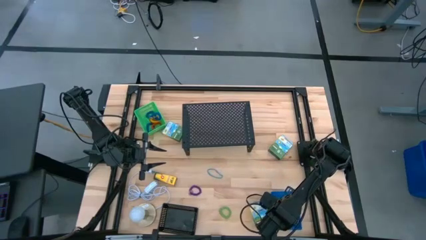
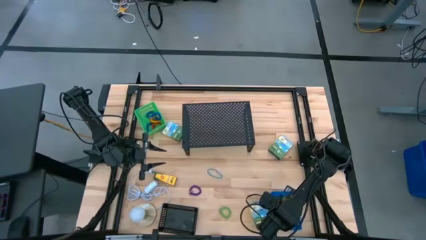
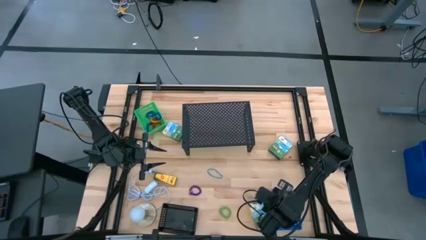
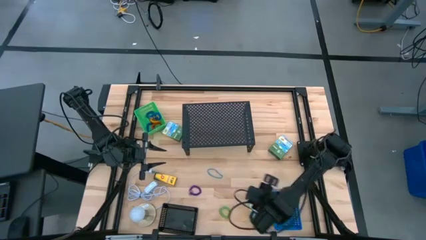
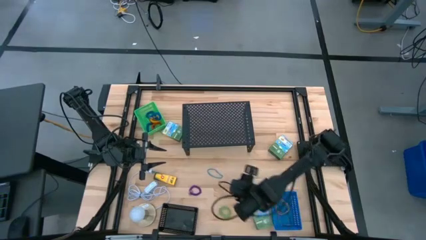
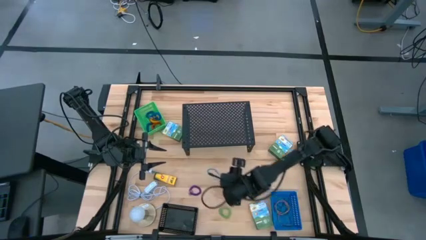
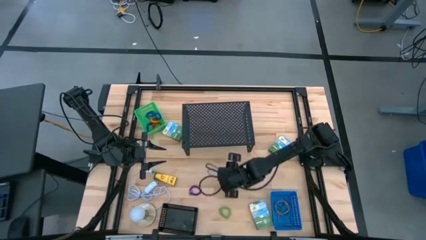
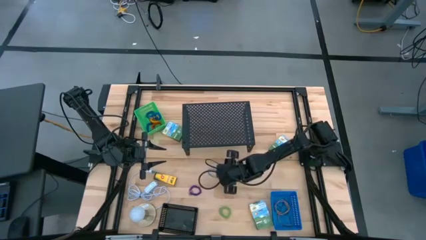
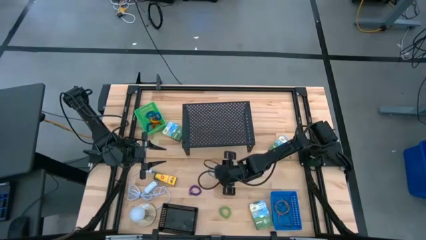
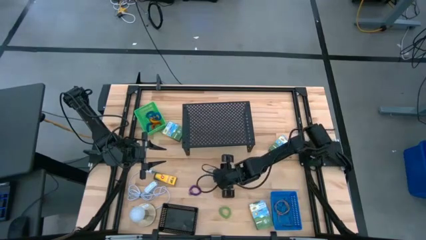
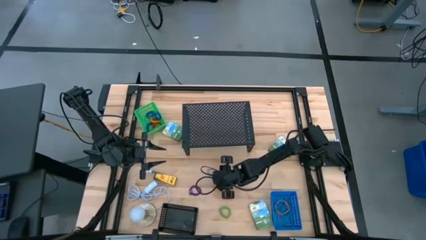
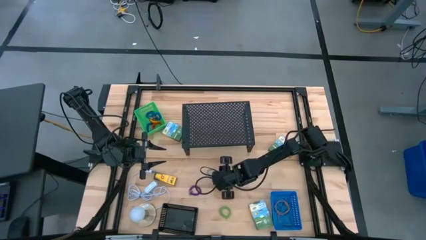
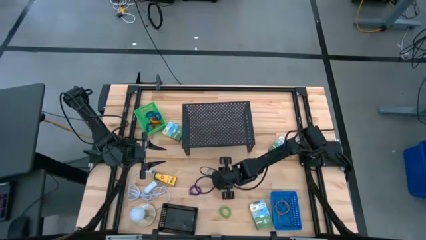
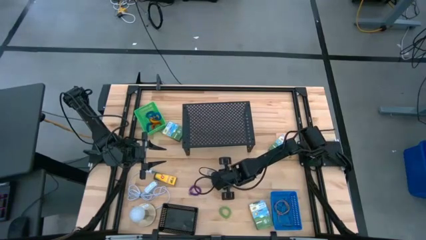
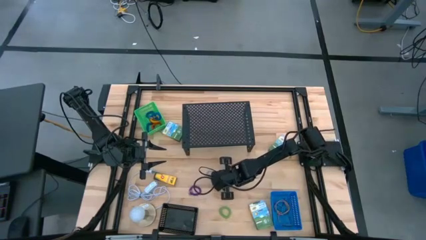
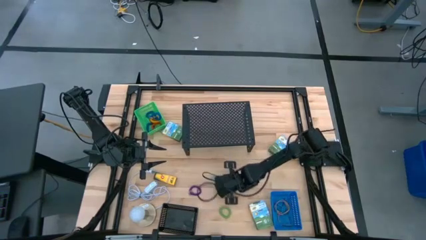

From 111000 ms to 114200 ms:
Task: Pick & Place Office Desk Supplies
Put the blue rubber band into the blue bin

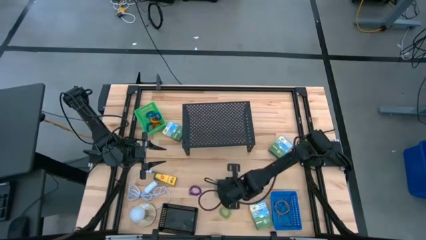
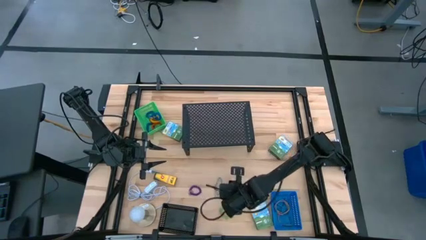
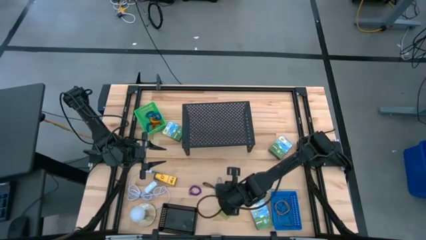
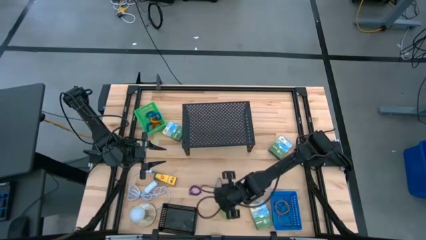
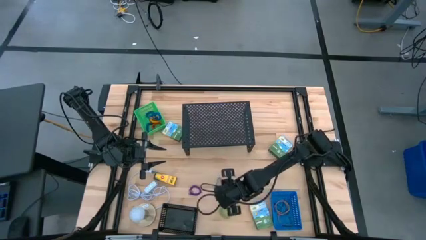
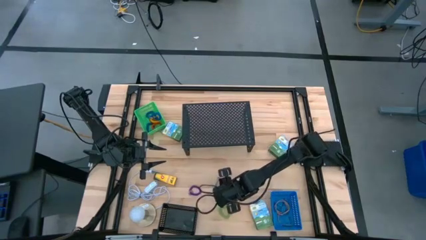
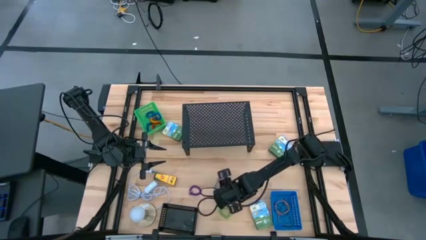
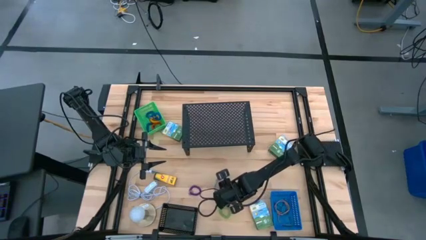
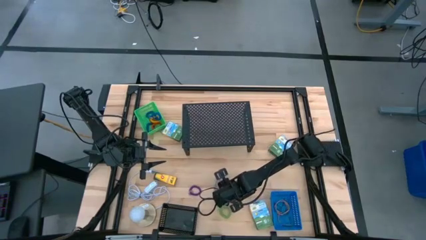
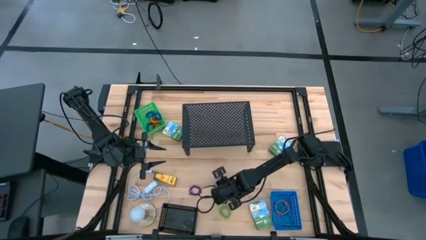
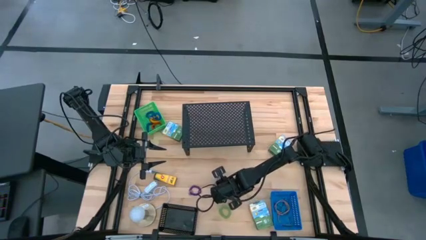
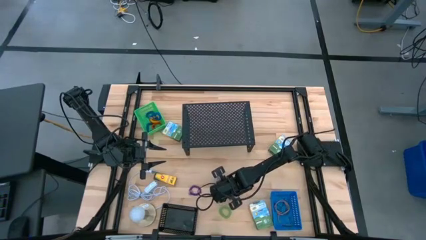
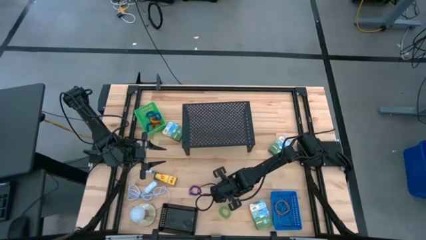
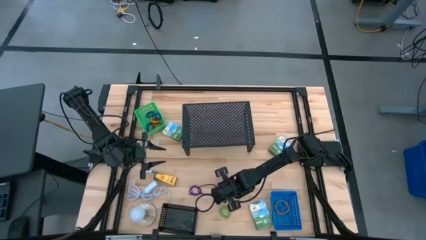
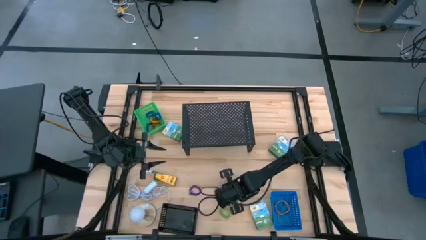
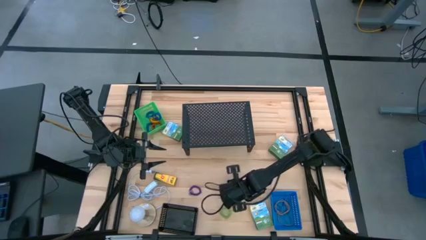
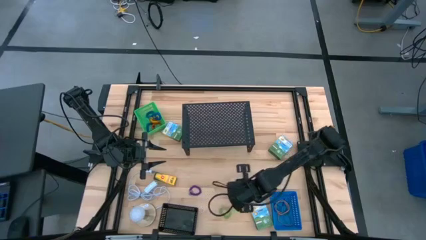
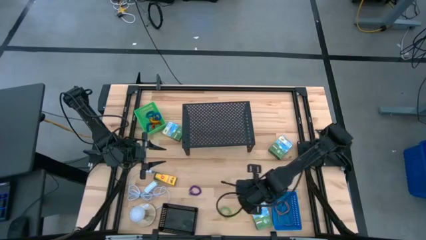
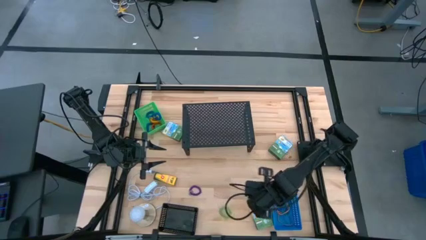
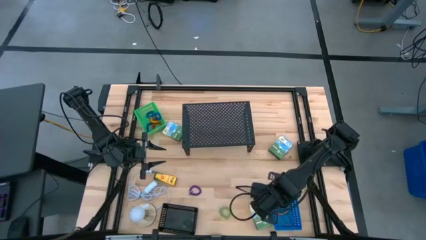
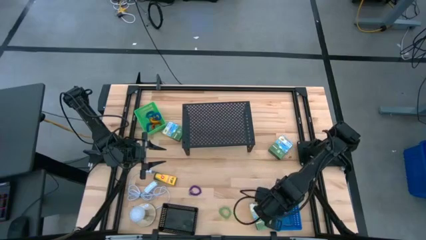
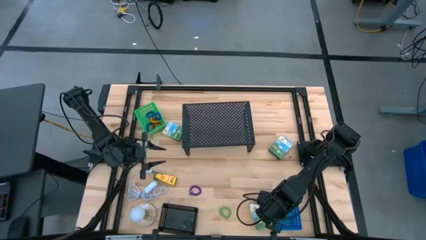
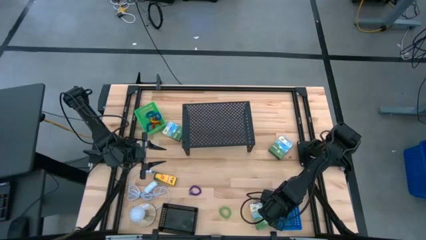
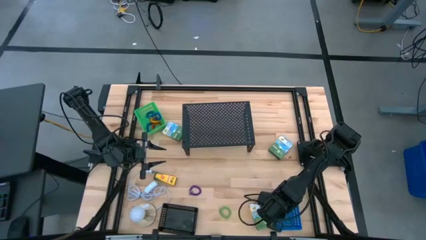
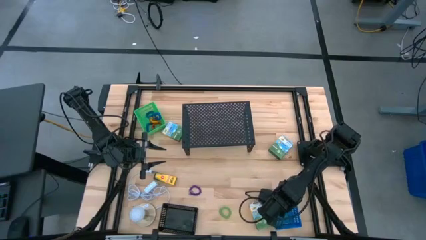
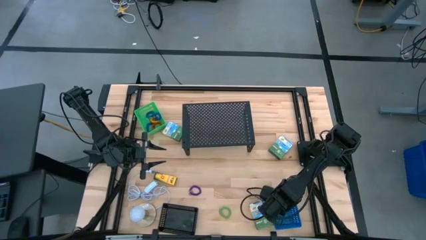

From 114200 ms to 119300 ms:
Put the blue rubber band into the blue bin

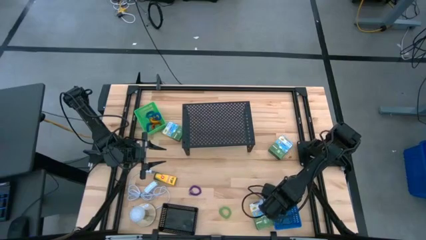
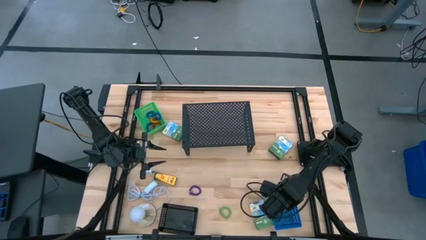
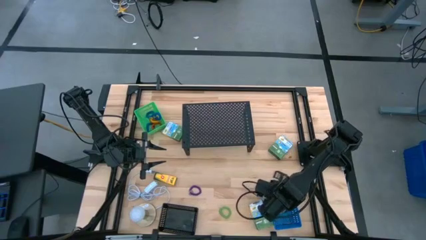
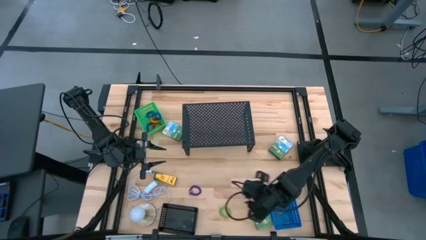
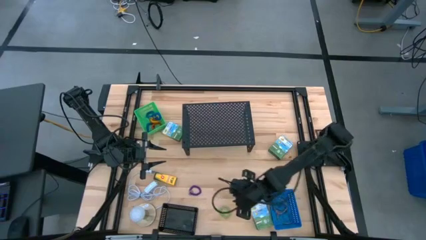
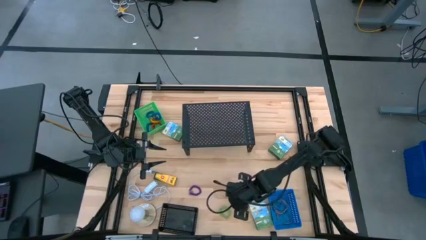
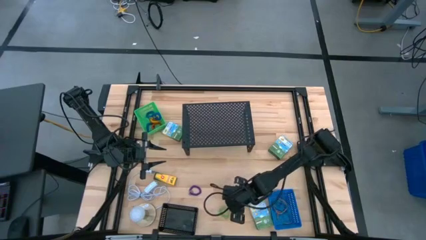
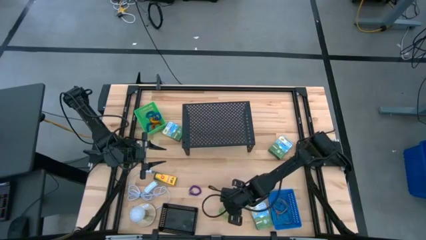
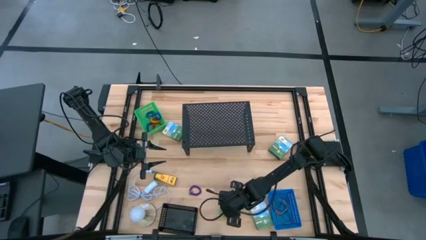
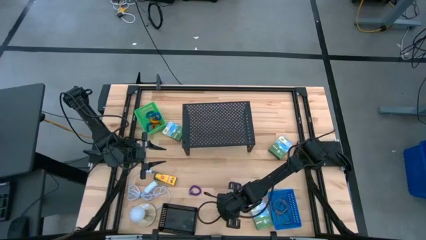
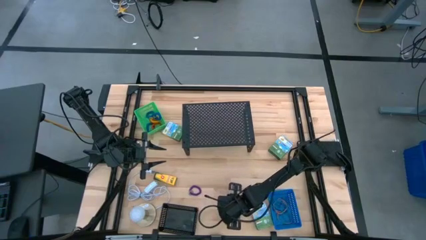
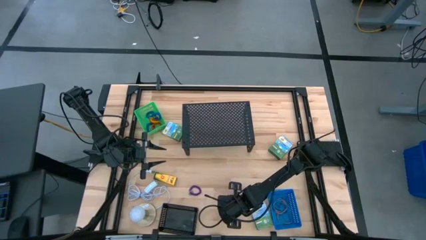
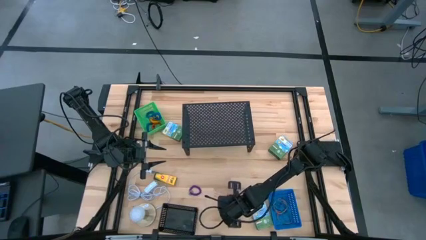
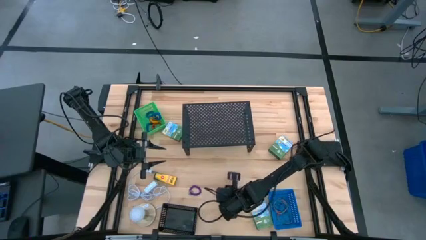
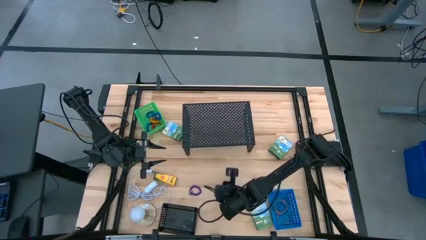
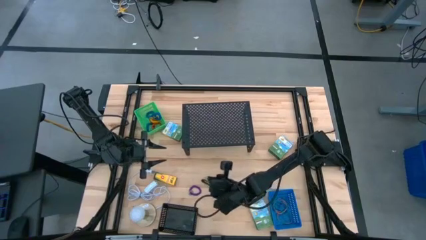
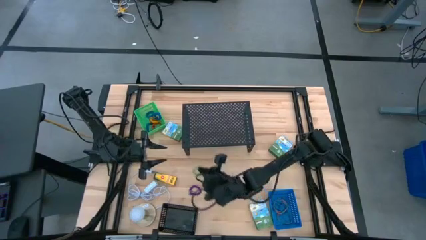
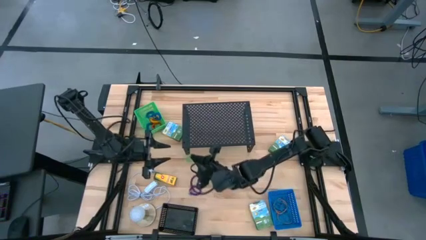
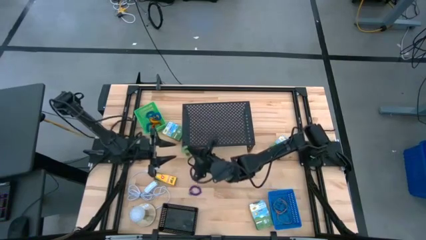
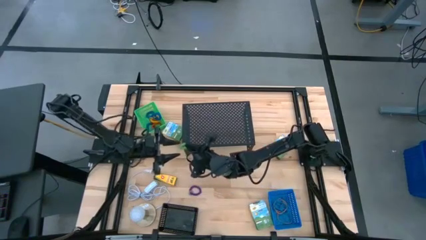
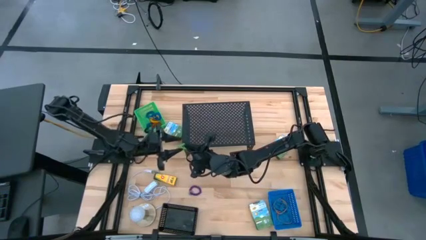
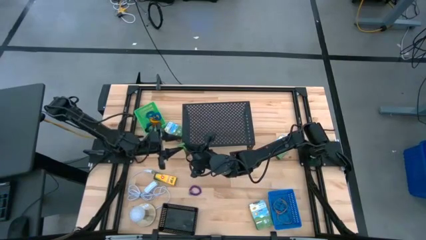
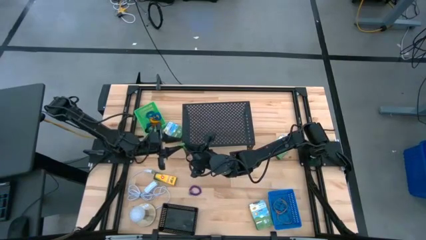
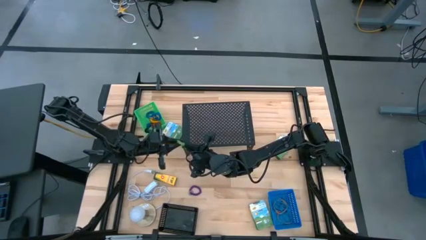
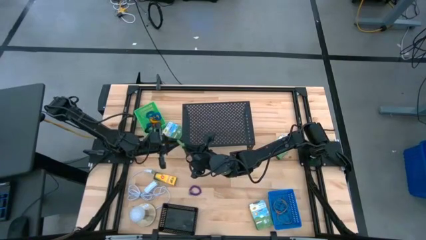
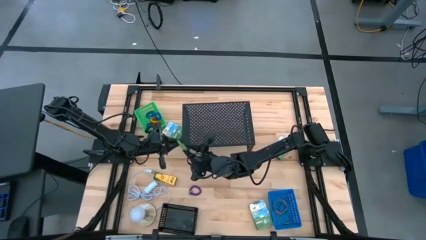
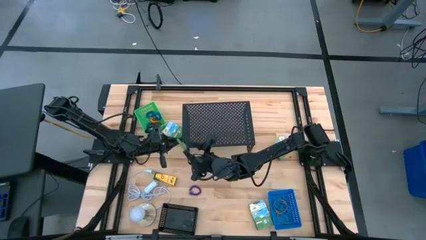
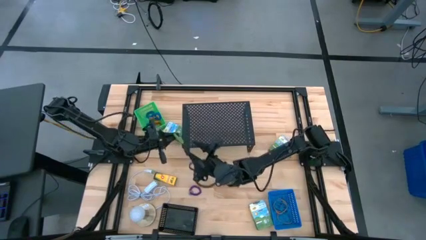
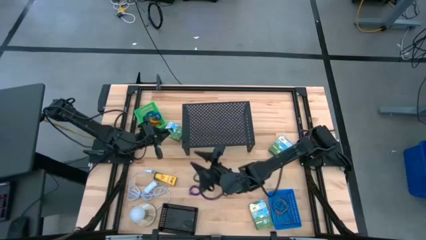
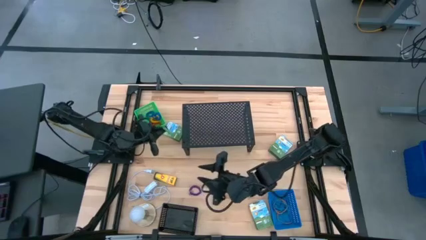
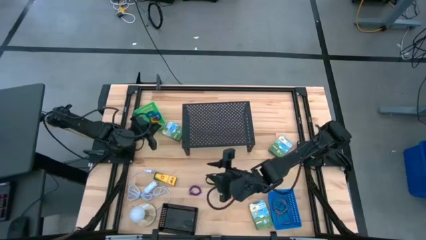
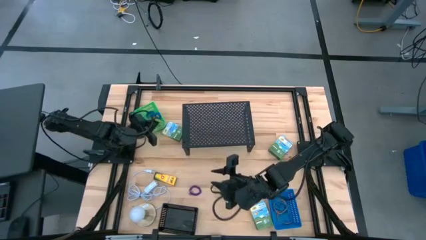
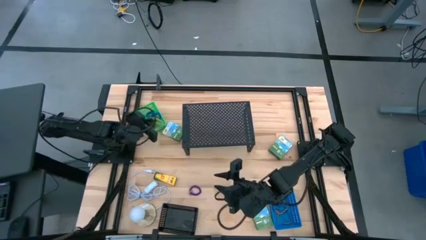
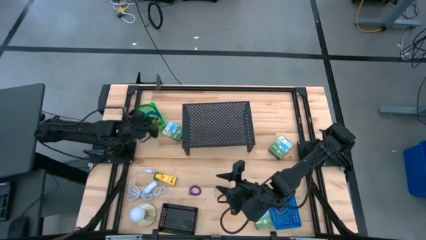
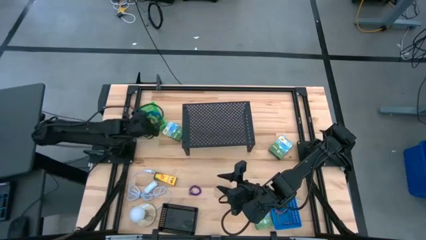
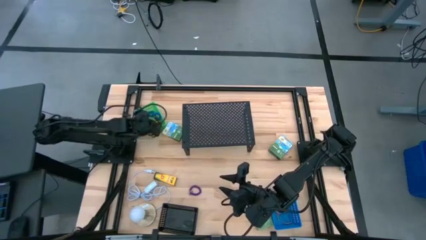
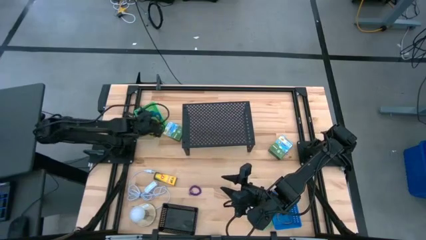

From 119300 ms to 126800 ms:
Put the green spring keychain into the green bin
